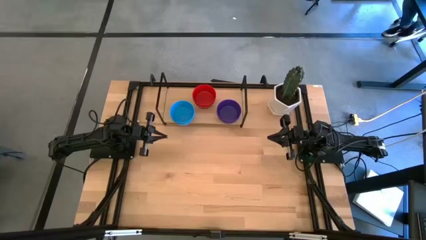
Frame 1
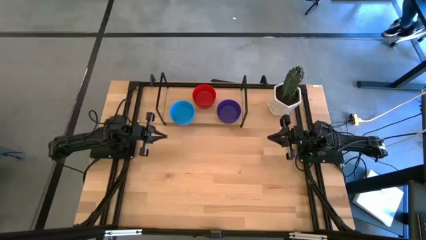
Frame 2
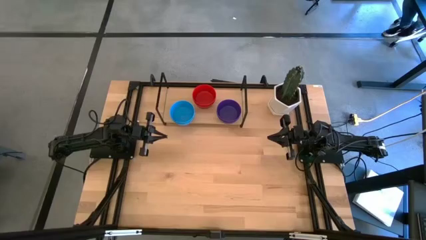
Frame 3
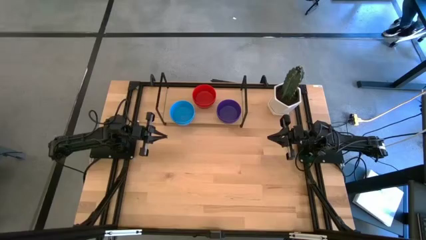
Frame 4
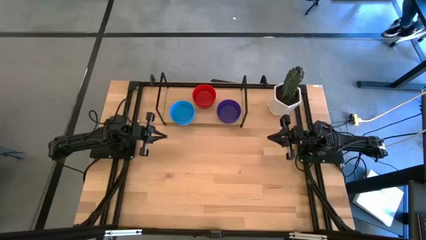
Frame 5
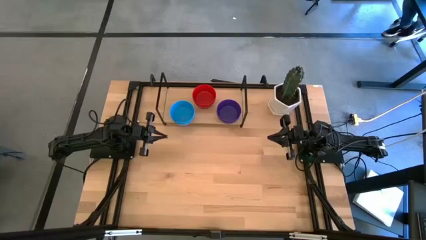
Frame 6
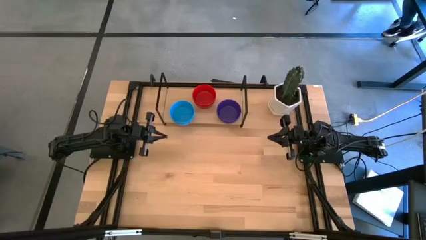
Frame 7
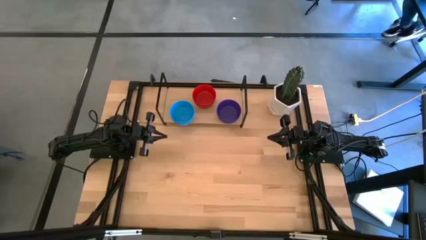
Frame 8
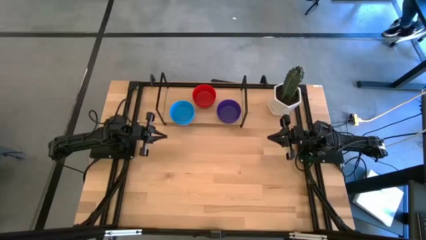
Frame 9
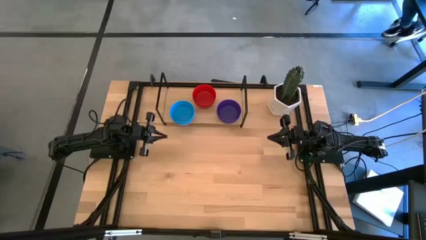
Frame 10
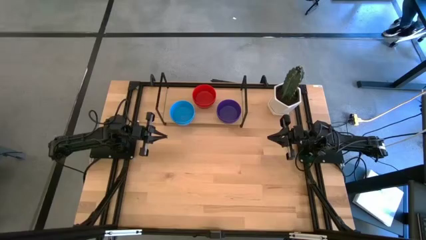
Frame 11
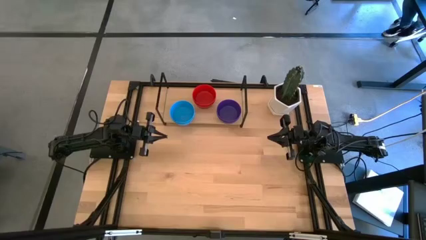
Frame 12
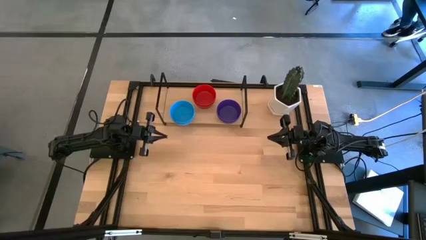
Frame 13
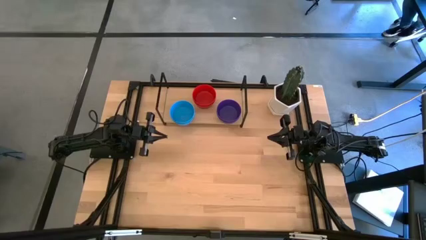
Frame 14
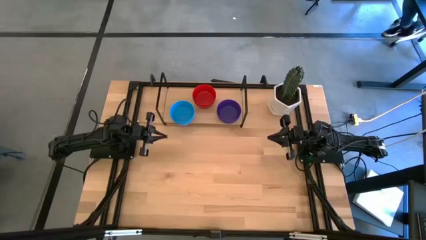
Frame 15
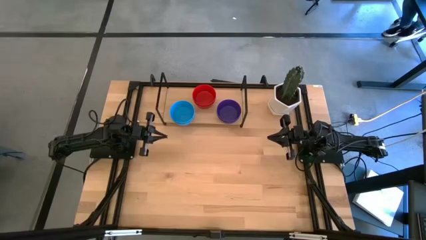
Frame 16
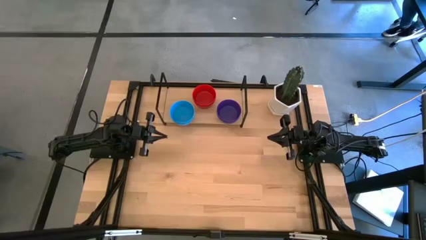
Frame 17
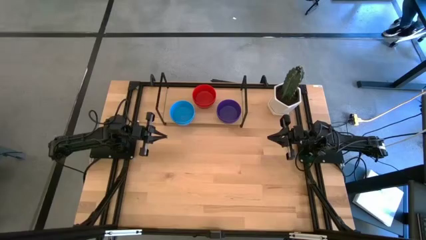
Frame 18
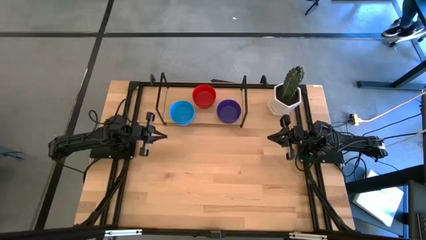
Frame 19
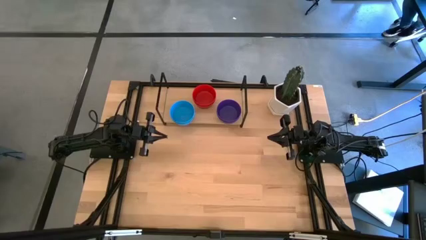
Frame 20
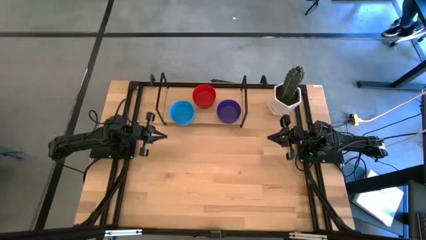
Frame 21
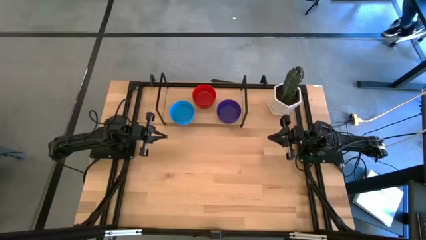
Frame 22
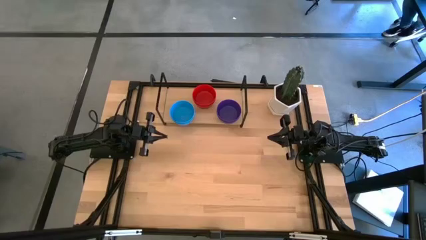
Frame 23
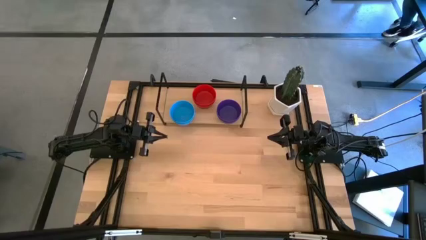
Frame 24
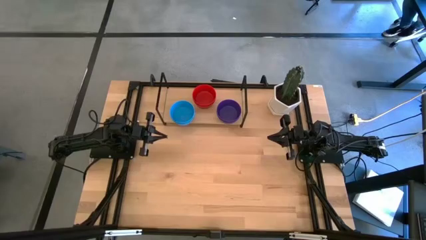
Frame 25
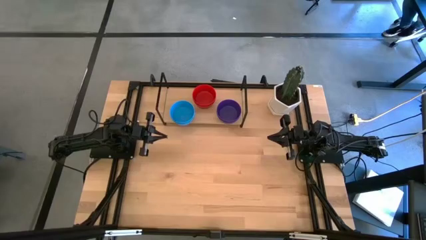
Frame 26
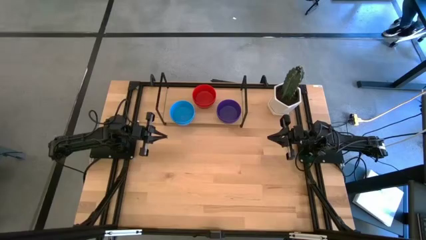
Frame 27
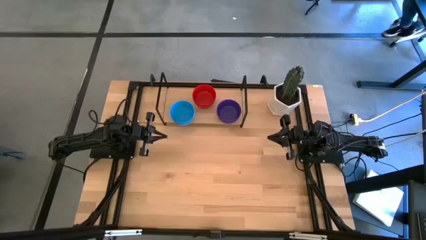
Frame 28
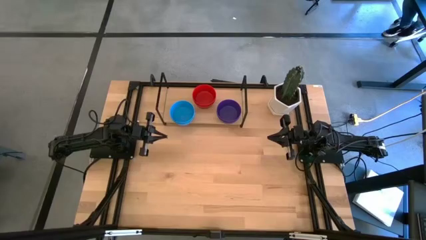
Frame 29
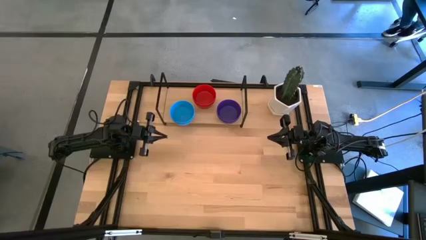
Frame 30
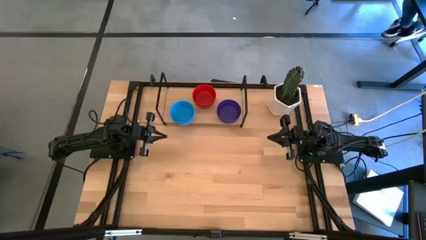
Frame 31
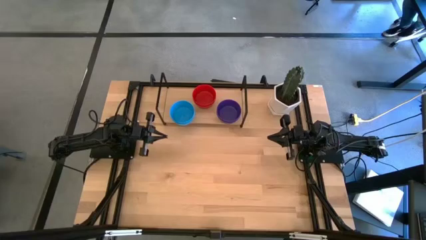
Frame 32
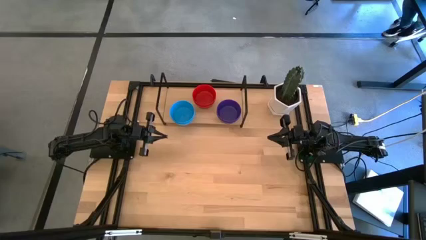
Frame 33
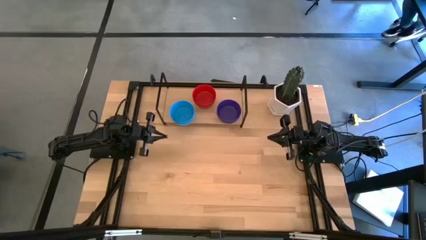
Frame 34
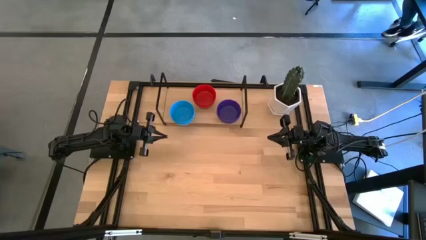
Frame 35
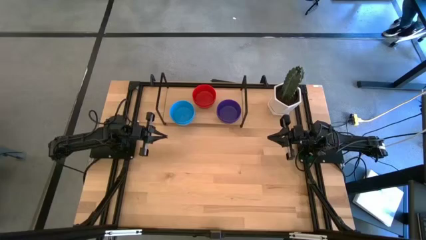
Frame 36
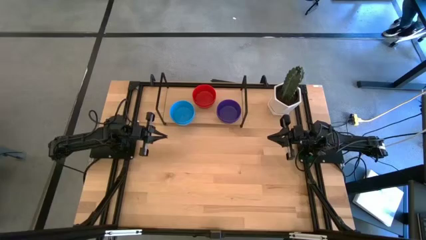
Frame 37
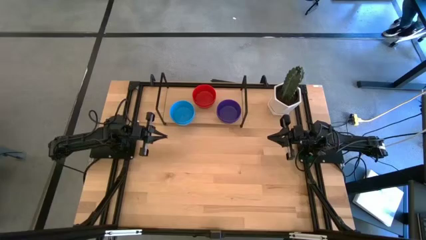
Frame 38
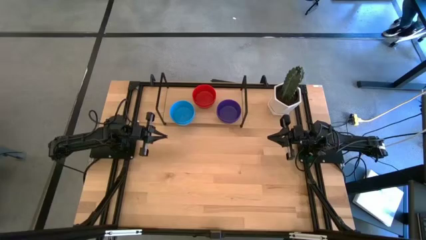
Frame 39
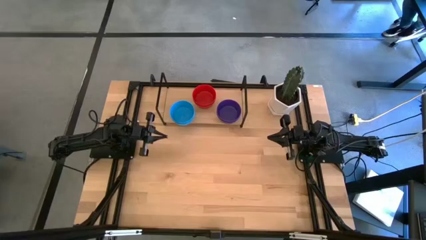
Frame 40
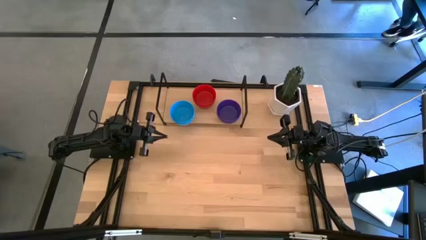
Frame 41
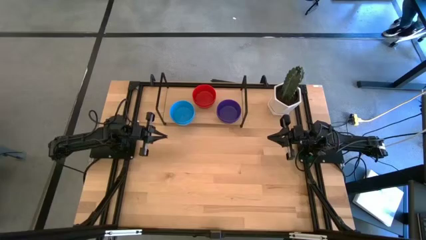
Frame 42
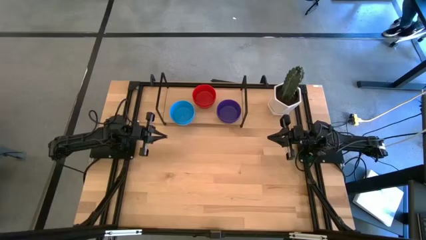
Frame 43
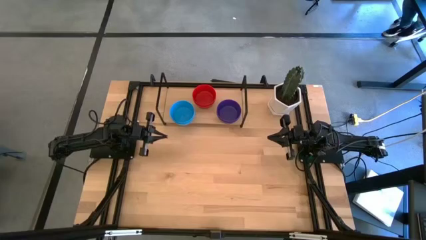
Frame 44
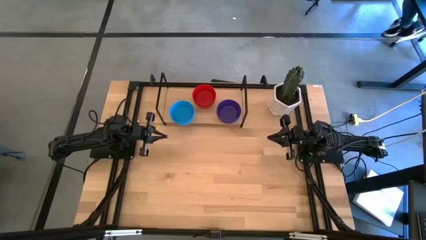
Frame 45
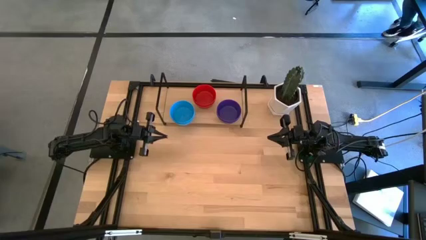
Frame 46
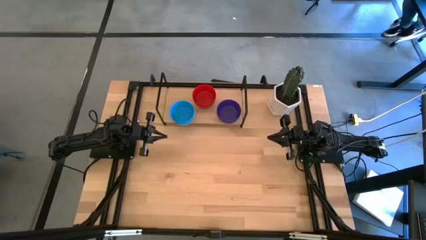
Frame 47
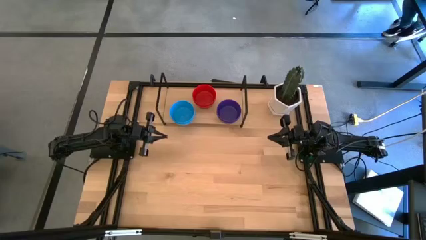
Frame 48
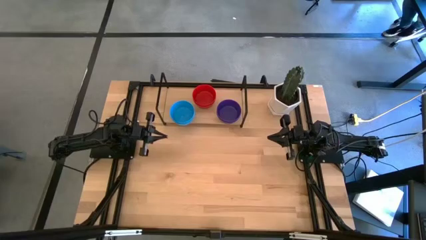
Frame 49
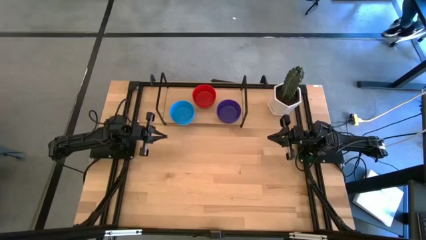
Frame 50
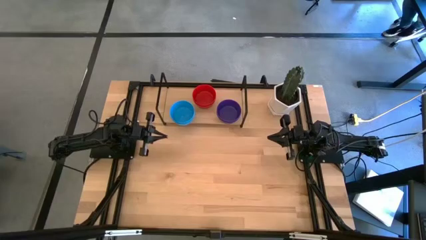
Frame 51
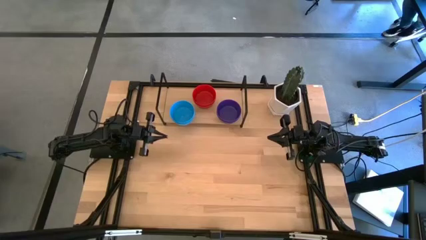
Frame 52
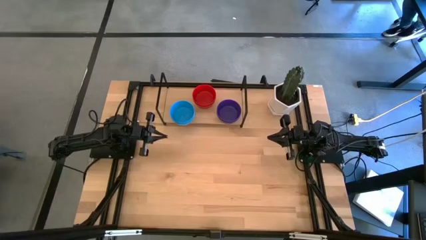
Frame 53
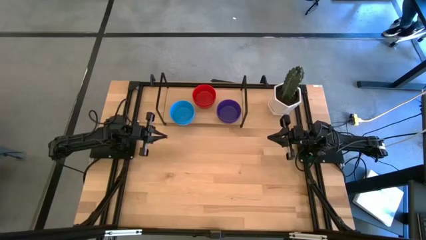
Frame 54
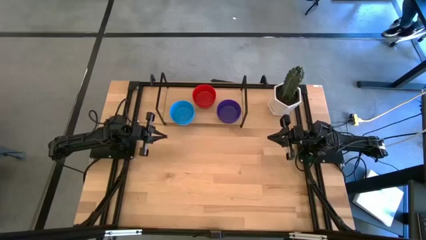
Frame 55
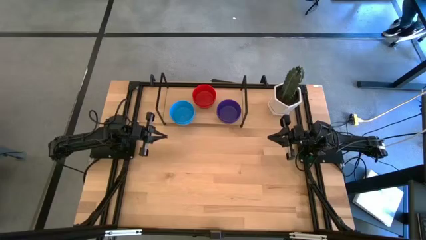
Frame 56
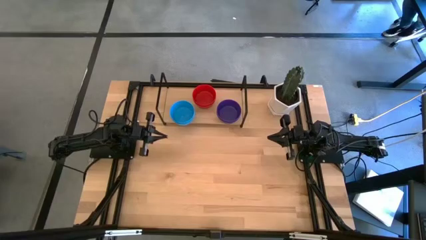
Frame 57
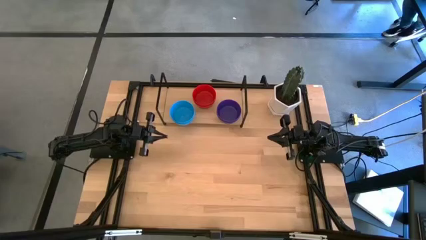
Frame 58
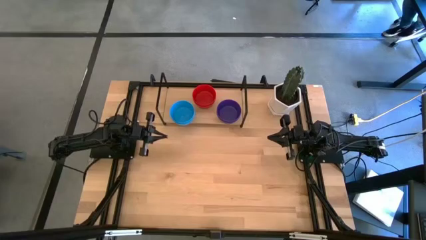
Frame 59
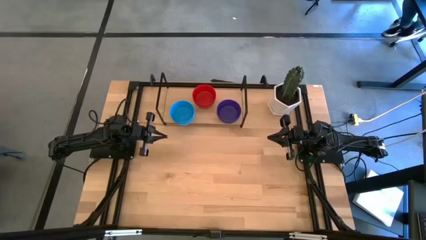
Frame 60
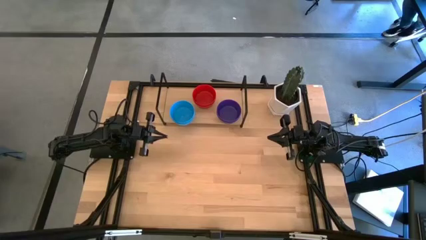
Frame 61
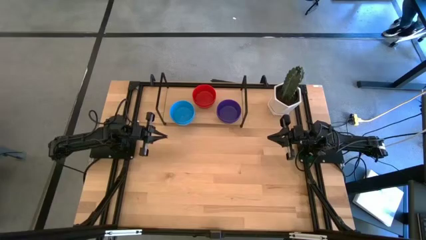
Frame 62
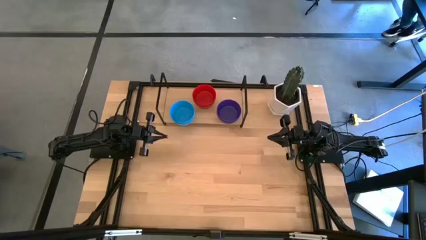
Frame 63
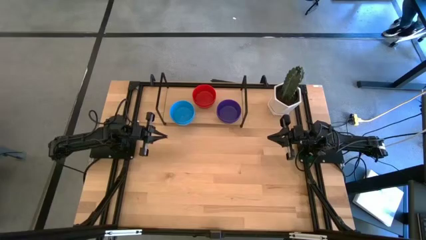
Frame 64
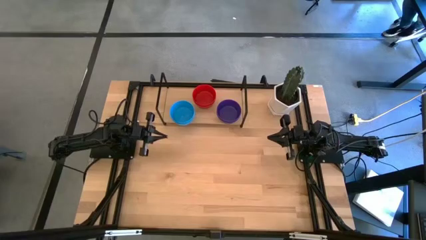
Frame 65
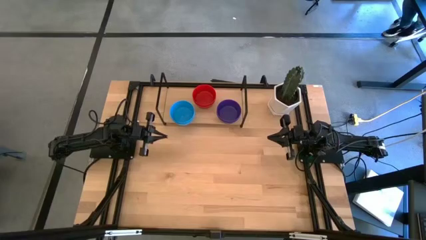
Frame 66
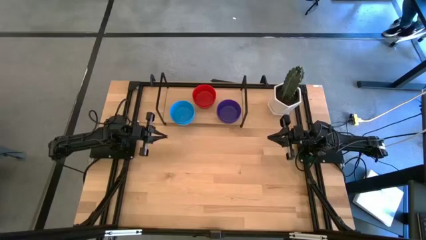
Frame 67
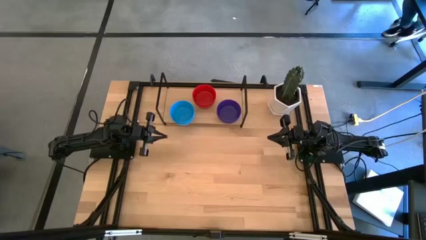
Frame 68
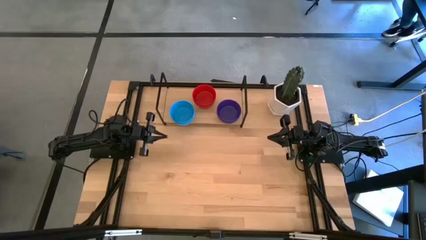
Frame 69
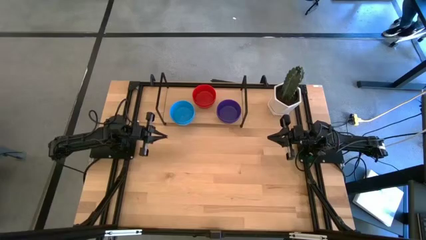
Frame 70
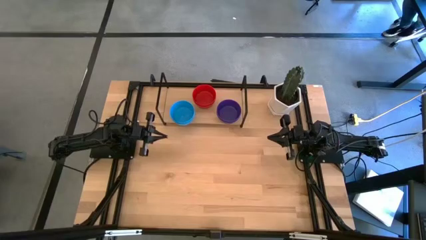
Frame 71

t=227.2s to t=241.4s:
Task: Pick & Place Mini bowls
Return to Home Position
